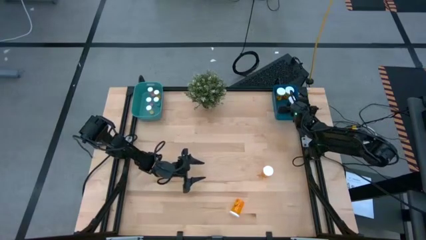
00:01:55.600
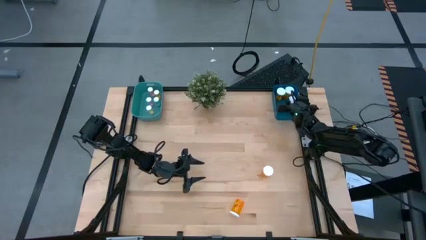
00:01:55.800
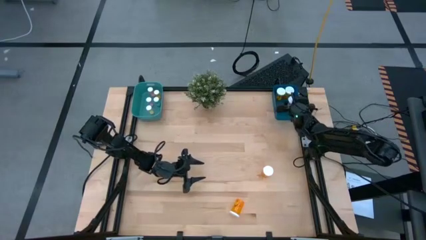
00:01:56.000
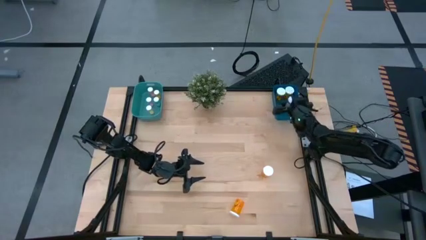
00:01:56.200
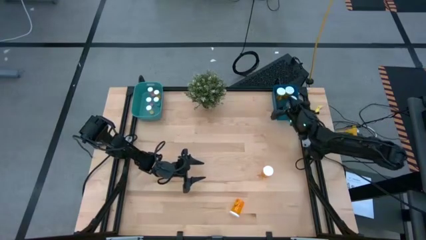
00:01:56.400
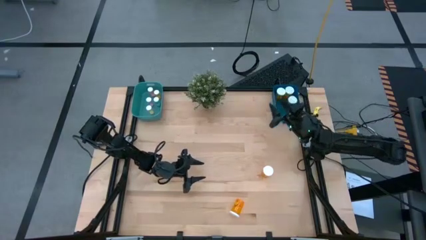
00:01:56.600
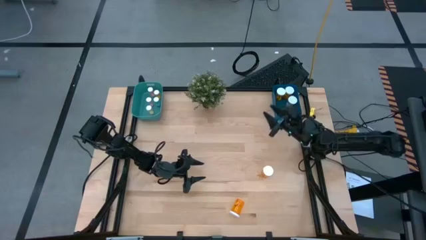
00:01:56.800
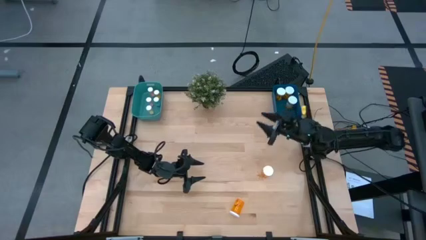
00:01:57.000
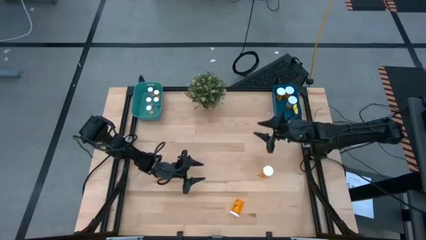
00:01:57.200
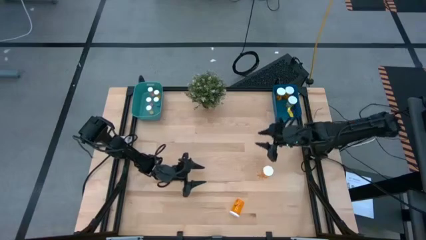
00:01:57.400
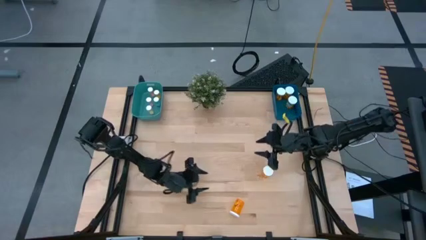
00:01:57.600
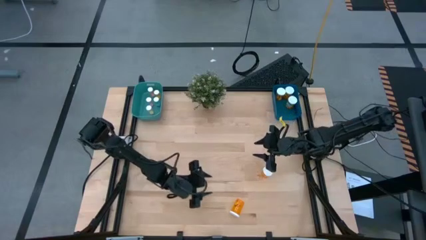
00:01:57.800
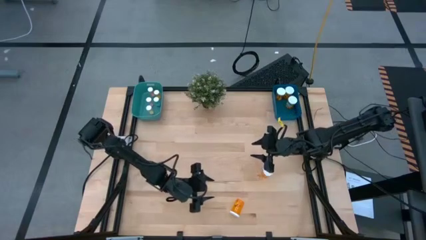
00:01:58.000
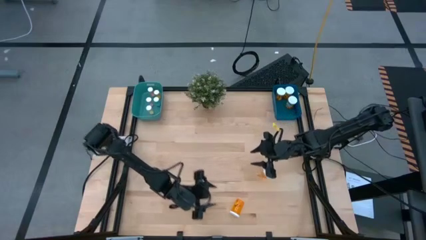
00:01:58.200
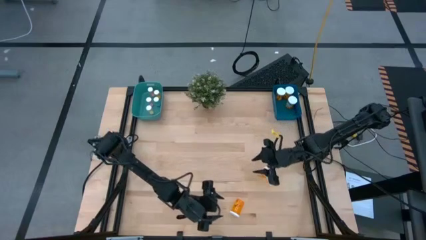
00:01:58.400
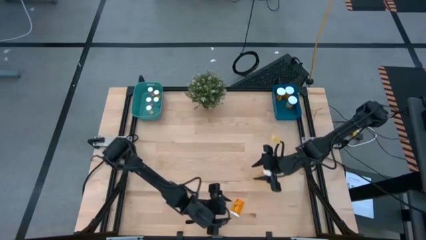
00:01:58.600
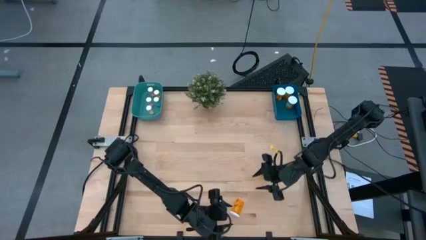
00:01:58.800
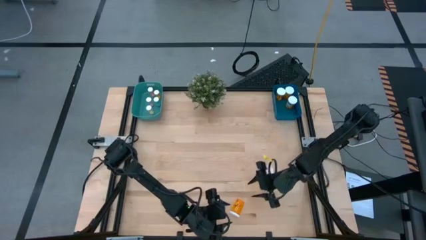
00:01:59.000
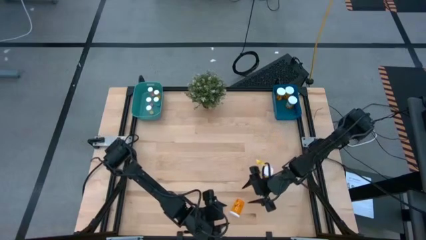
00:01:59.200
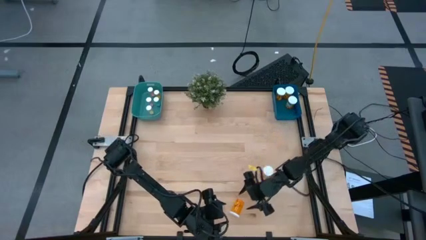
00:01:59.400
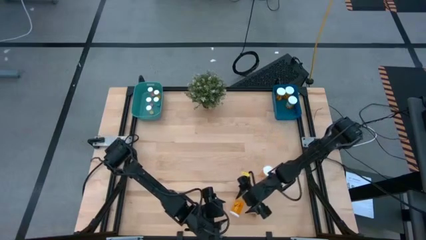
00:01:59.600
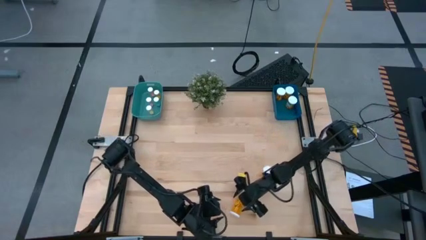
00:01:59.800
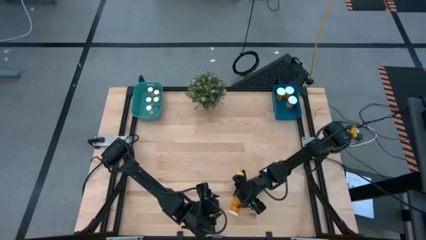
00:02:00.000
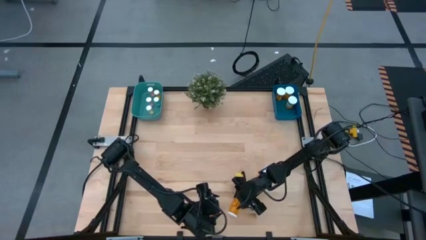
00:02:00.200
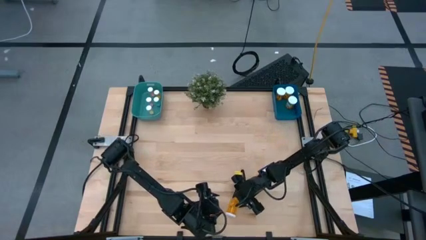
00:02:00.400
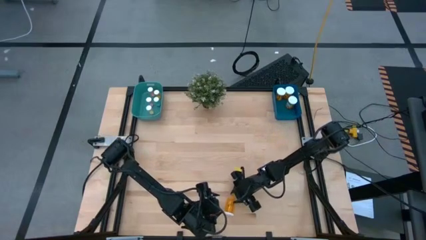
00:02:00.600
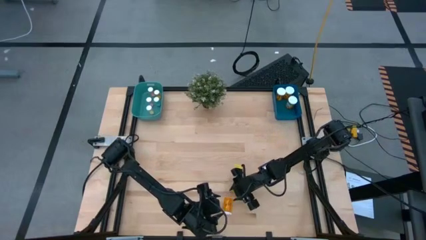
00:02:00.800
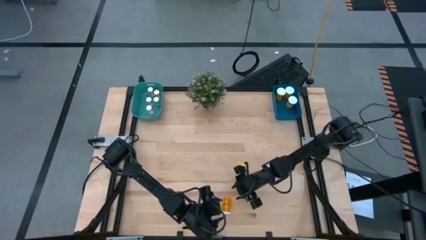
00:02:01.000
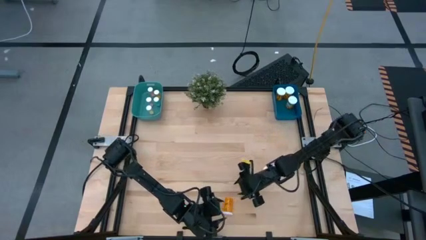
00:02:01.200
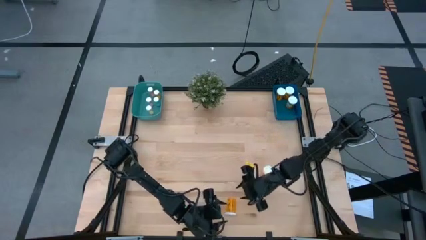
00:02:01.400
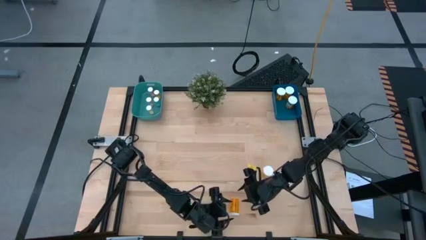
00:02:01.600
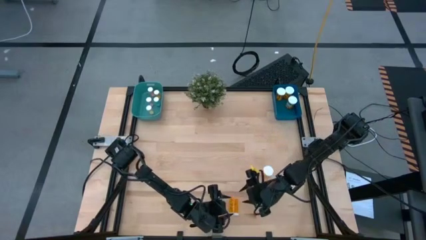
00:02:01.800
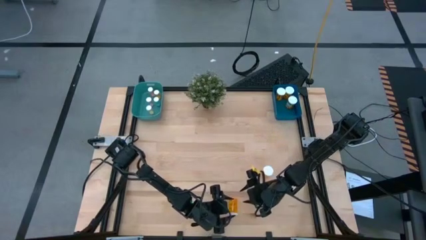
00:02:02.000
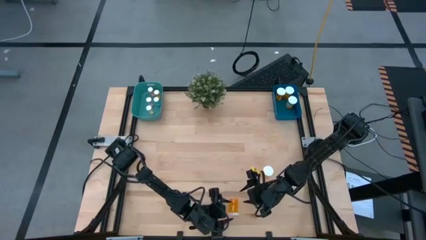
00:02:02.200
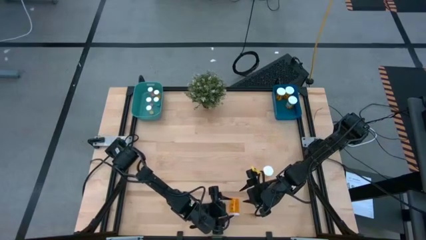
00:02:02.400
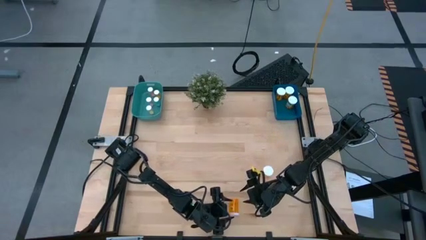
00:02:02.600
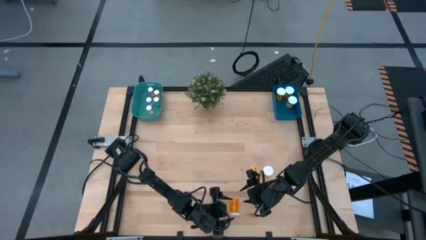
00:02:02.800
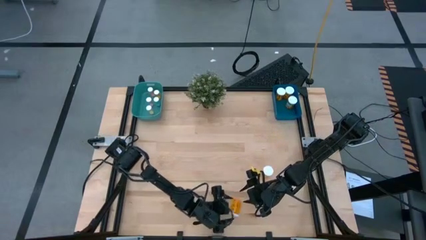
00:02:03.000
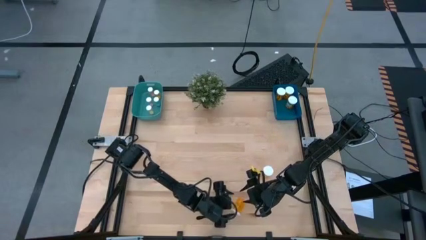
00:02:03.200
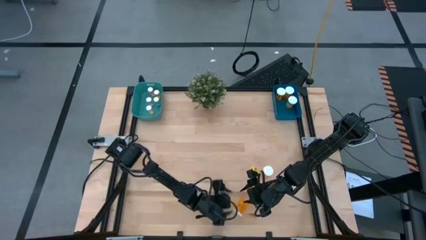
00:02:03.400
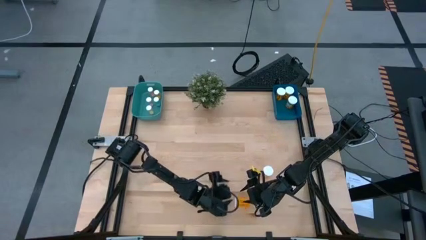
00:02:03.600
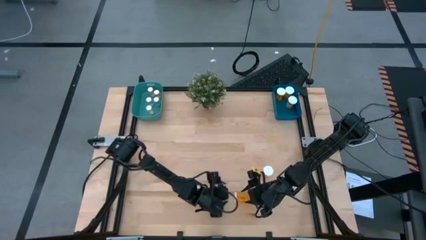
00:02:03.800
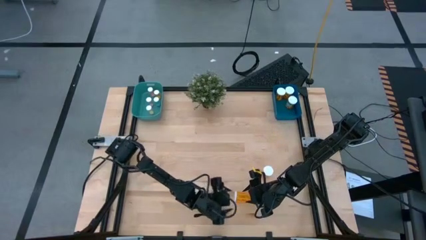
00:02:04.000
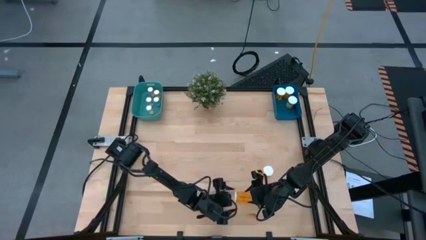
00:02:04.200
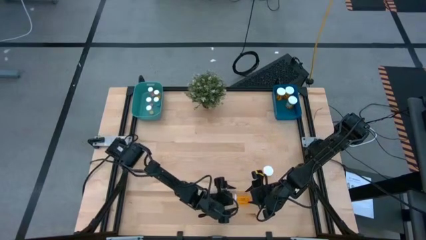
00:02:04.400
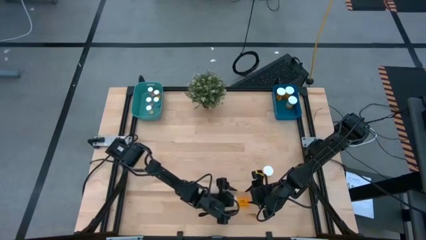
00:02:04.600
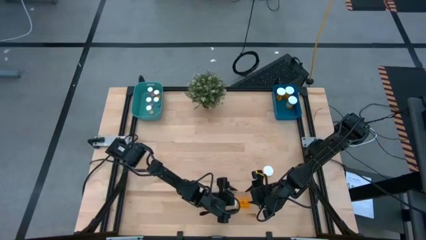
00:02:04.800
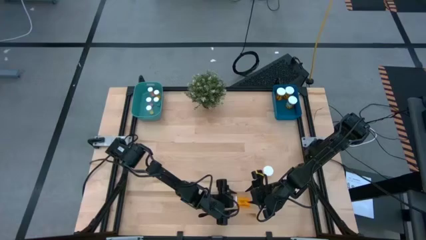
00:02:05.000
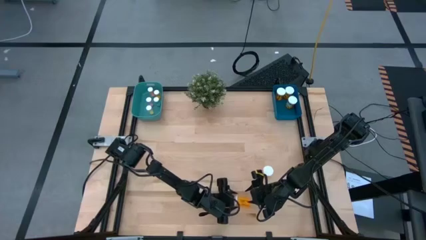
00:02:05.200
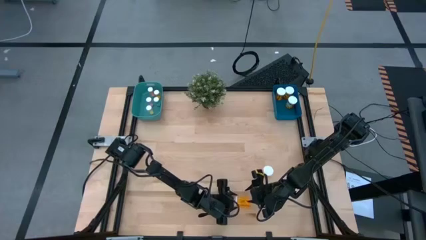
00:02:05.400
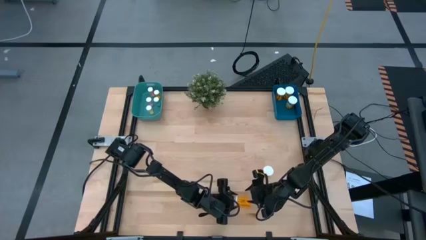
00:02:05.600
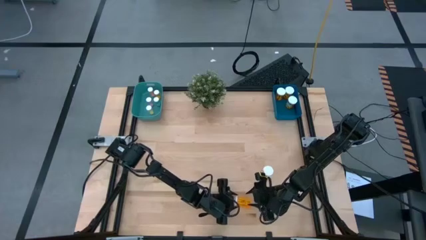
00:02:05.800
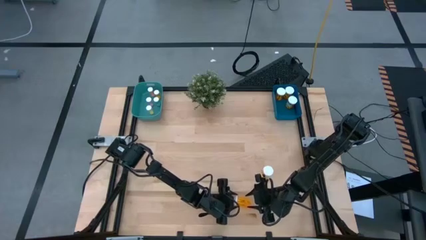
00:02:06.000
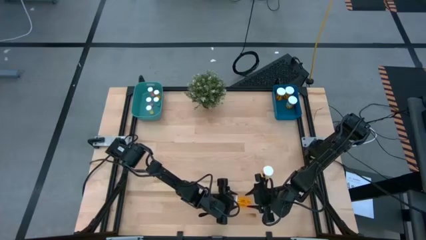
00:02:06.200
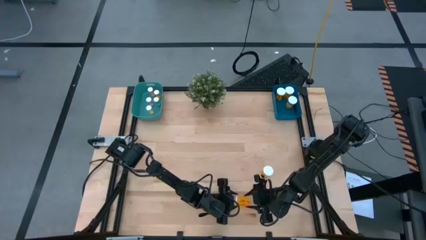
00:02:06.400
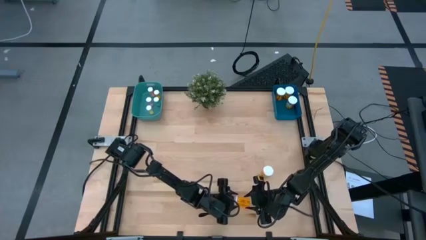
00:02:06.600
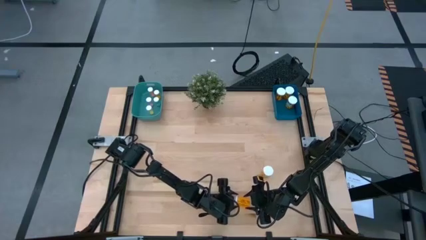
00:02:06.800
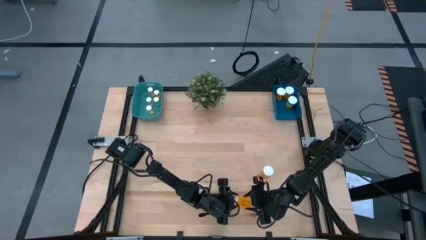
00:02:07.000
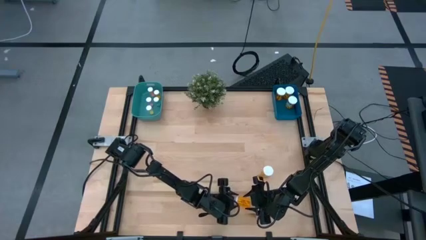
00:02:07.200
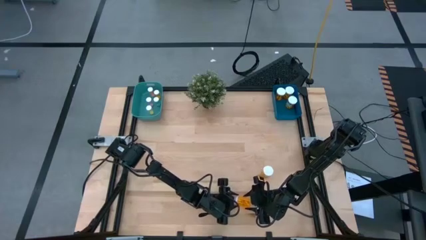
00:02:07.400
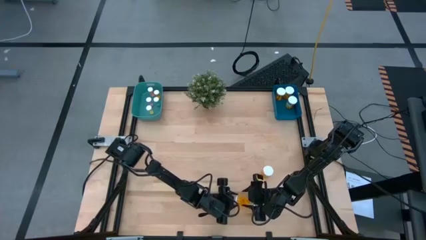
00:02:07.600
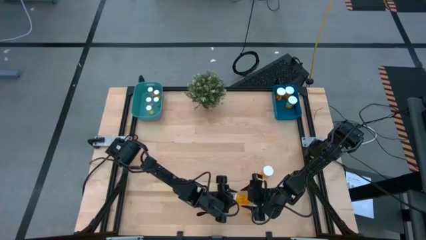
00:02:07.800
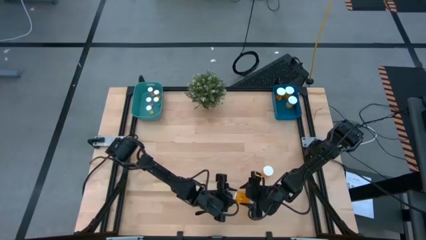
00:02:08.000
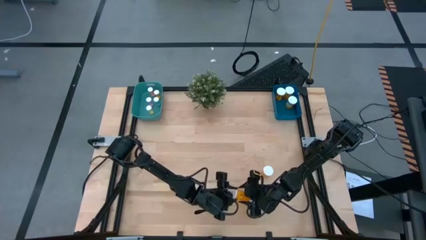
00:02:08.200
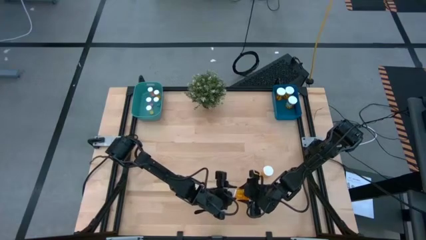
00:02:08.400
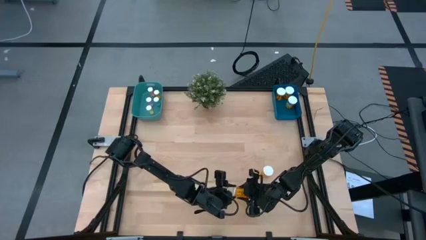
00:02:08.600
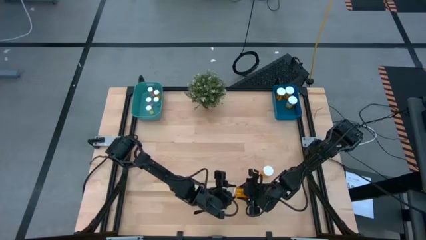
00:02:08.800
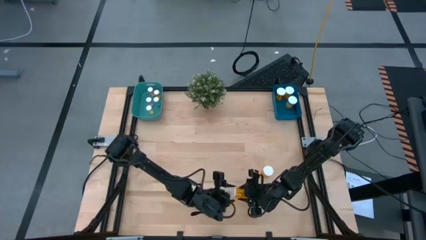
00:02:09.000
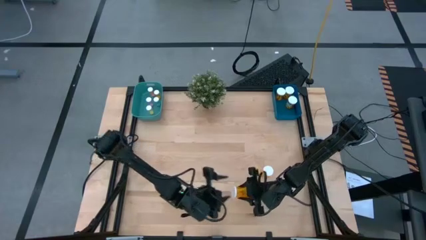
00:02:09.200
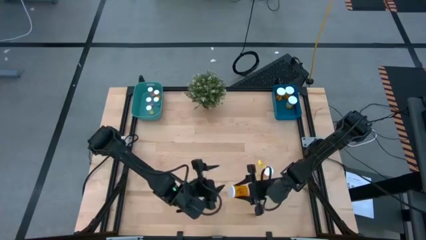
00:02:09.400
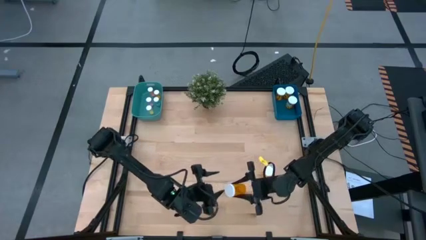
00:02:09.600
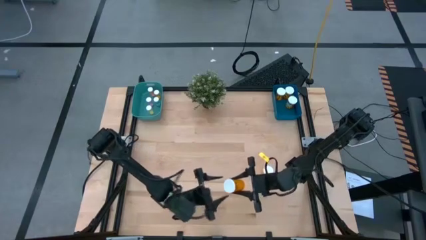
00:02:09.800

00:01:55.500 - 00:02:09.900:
Task: Pick and place medicine bottles into bin by pill shape (circle, oval)
Put the big orange pill bottle into the blue bin
